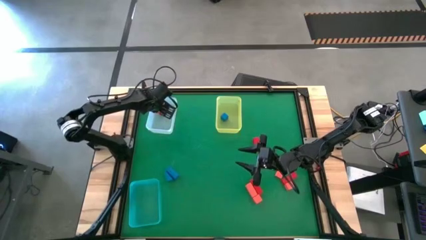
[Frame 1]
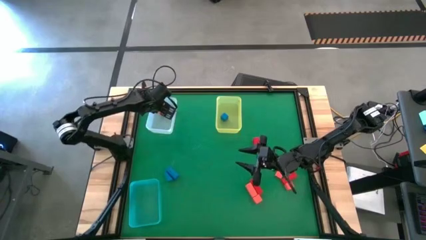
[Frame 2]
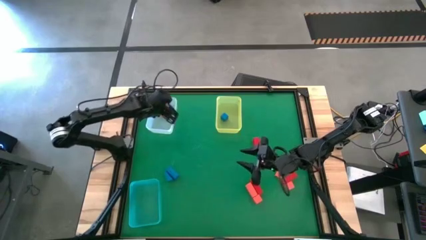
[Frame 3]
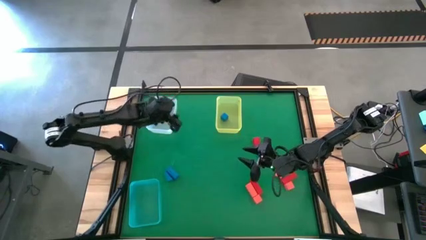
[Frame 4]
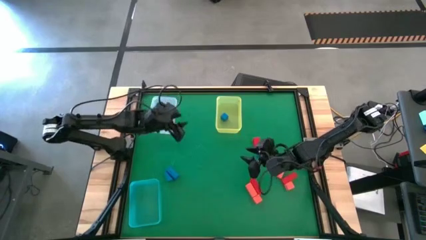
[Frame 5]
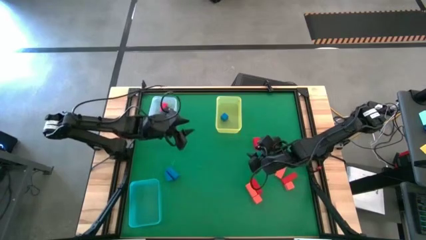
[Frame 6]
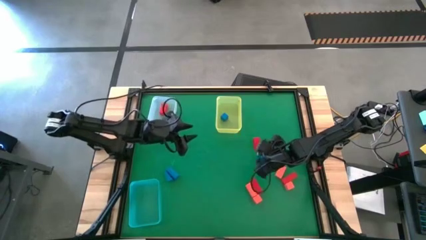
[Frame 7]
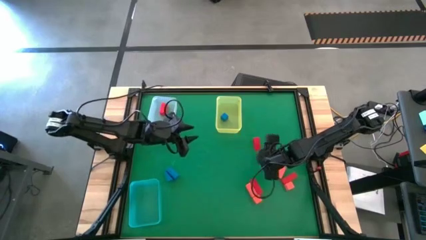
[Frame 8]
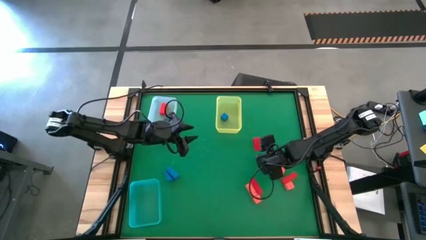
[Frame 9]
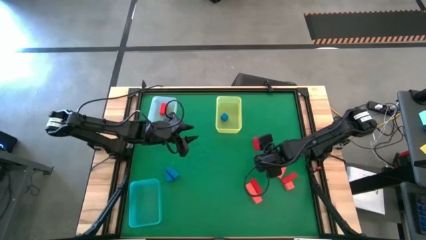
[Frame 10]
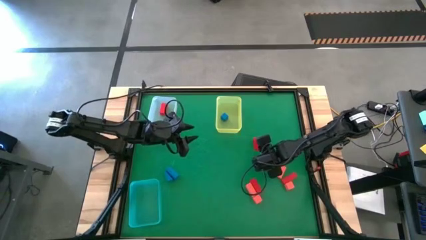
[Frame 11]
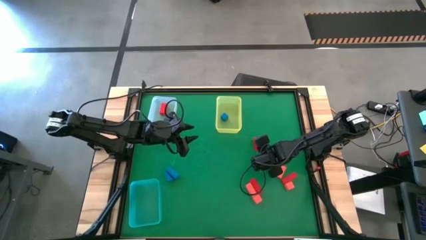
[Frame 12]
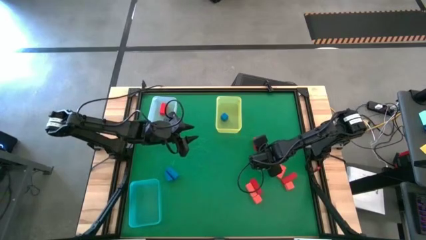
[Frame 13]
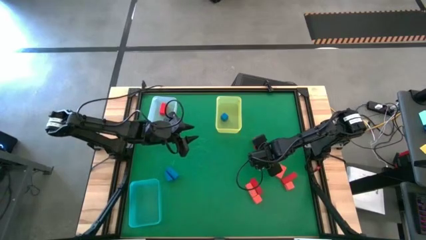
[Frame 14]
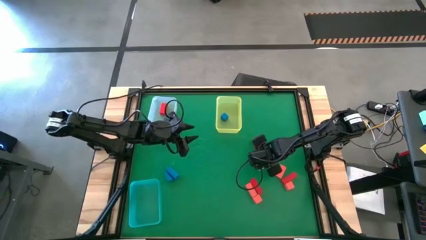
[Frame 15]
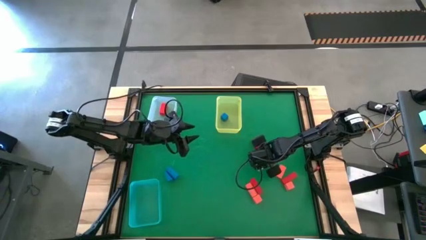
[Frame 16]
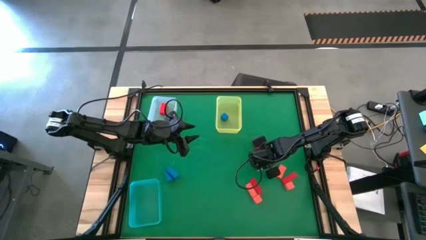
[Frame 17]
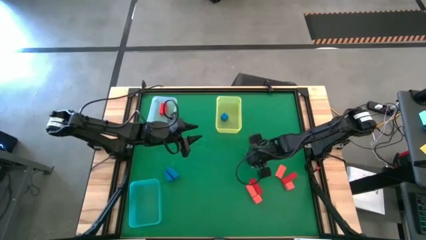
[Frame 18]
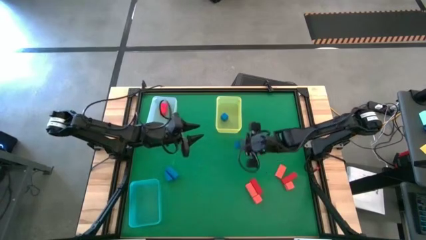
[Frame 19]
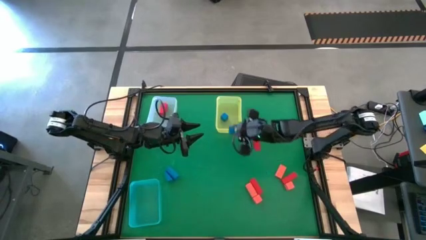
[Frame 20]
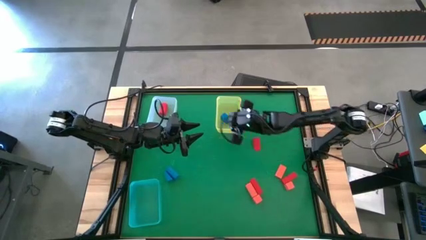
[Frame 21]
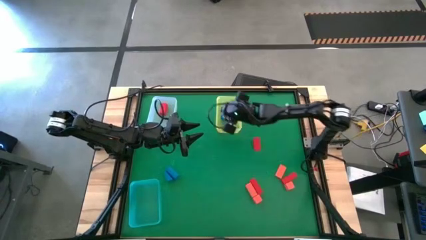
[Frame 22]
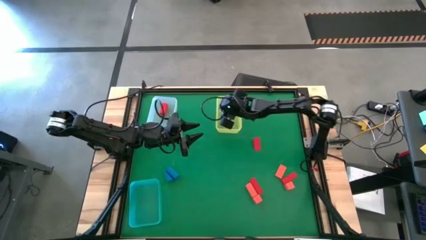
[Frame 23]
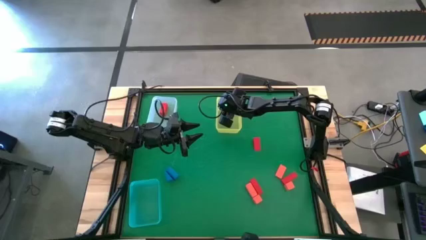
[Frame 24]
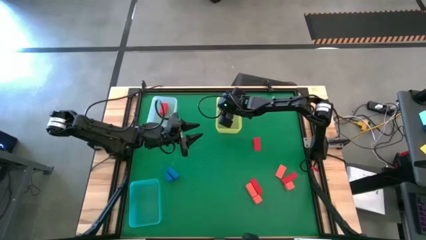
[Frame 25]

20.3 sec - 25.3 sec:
Task: Sort & place blocks by color
Put the blue block into the yellow bin

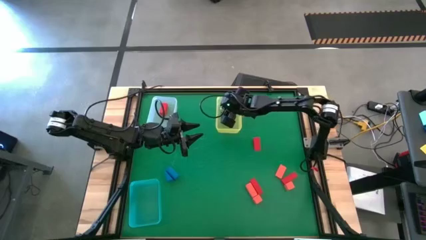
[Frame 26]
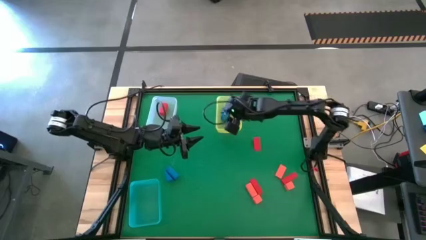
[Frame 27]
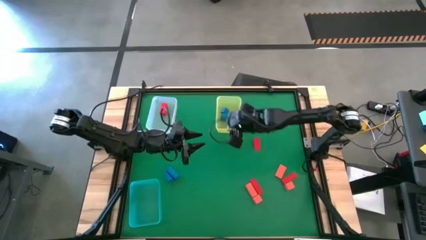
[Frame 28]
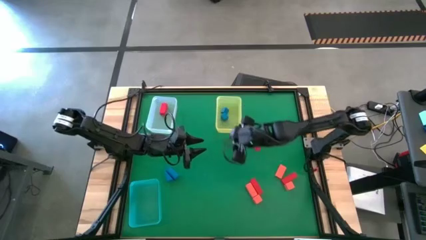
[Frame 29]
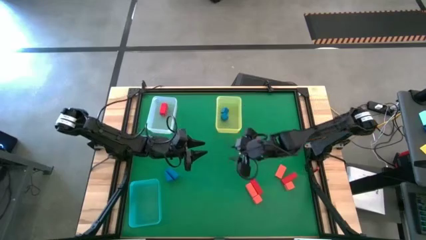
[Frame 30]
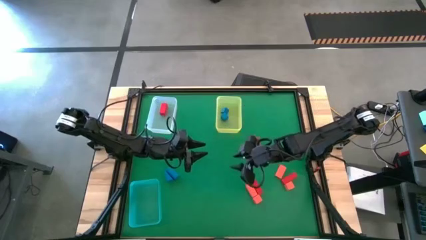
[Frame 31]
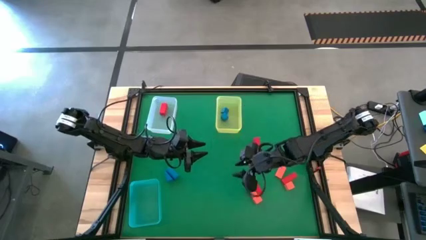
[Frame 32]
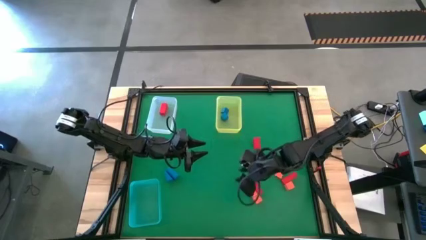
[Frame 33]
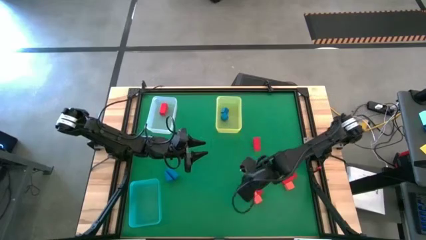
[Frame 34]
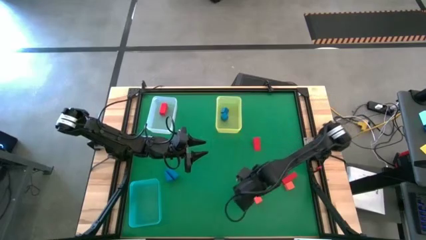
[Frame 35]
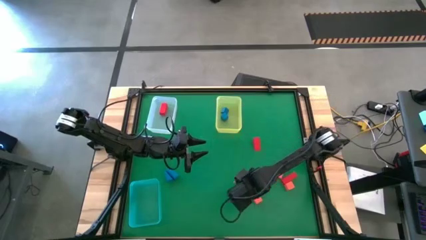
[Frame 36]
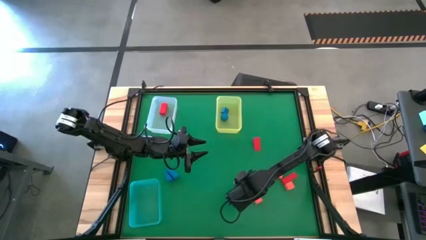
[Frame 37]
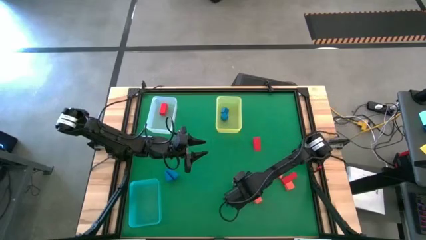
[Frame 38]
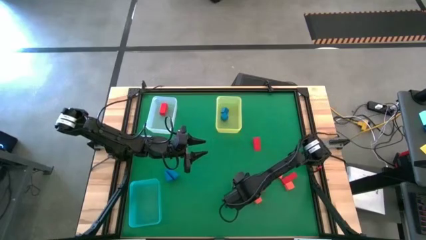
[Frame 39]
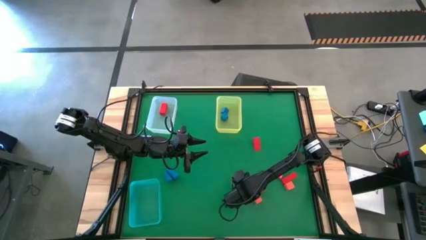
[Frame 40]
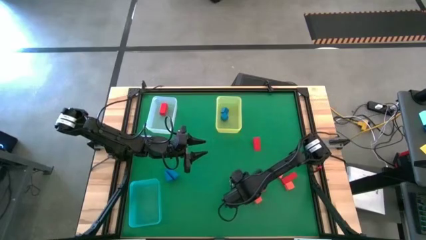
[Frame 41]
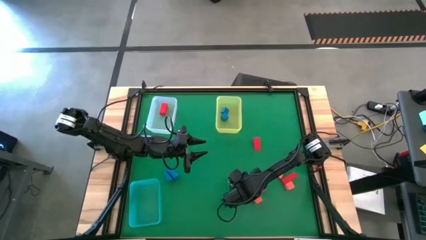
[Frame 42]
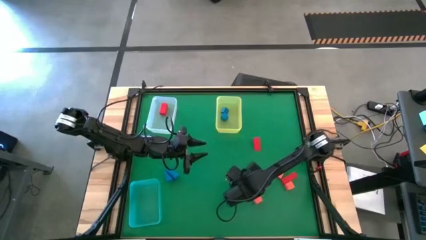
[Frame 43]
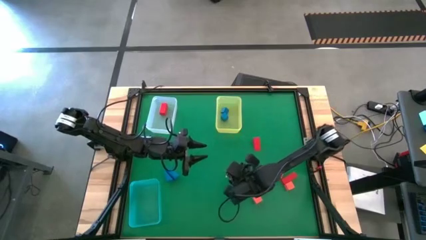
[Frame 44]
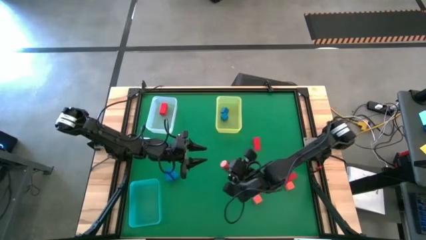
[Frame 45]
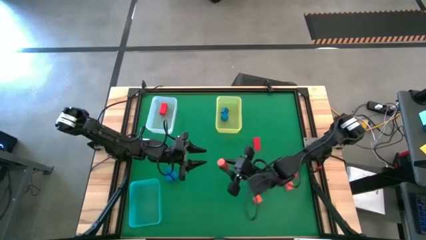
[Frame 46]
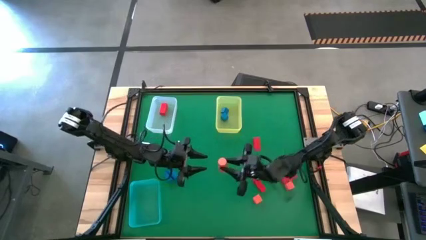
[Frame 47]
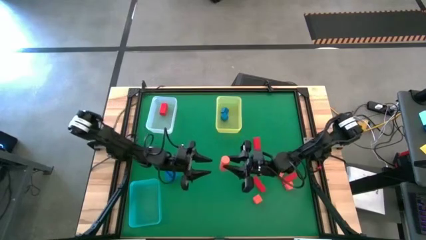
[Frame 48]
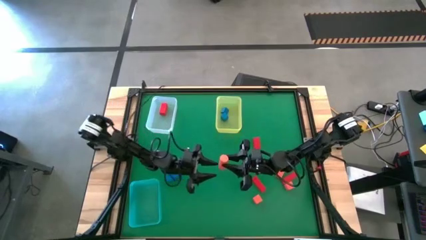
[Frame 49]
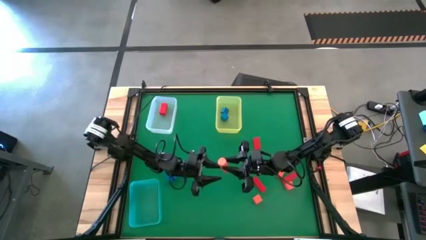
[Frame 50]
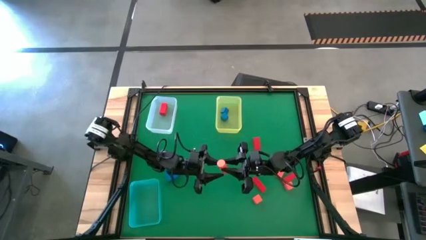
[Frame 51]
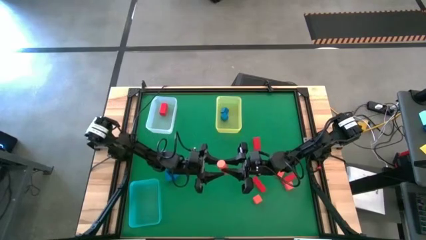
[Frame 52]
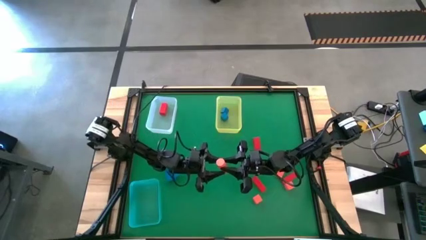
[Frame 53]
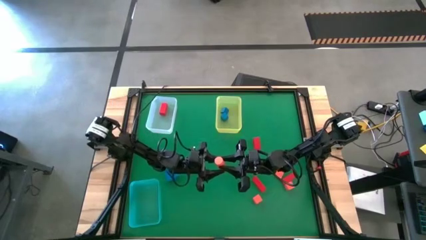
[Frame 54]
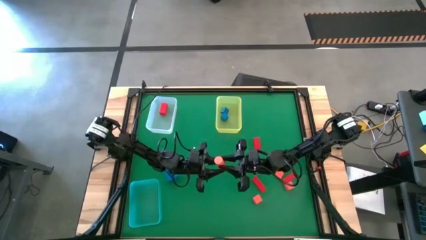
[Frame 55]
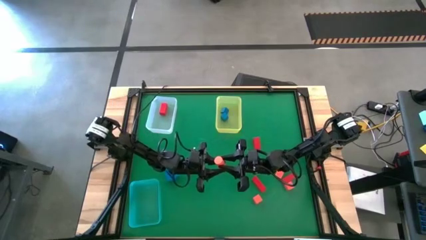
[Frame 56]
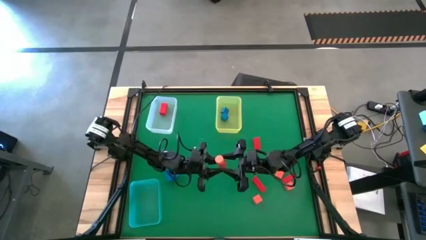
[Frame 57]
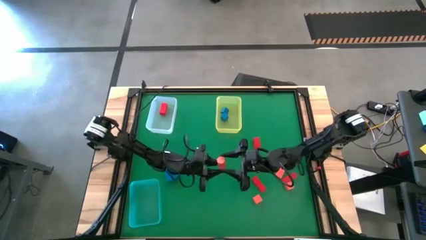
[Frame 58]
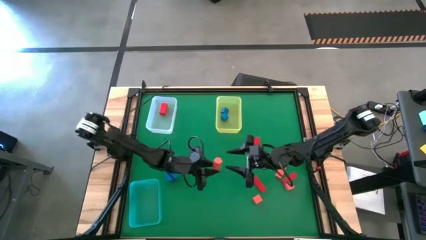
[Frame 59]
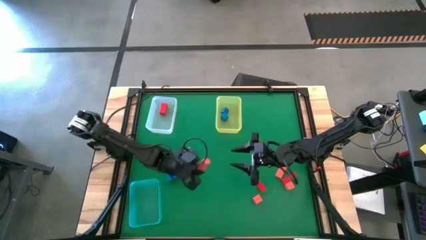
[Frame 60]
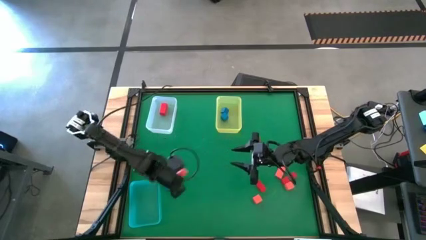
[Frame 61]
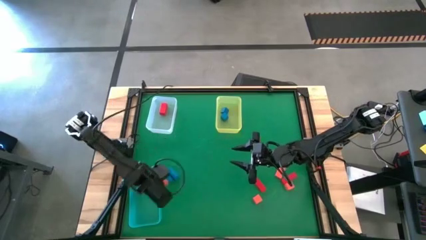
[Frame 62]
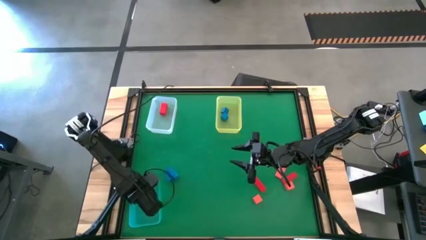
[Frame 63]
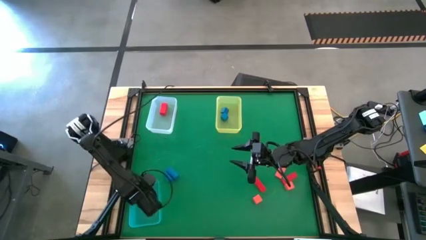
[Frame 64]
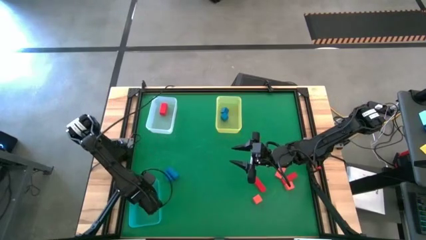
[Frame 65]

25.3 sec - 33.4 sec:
Put the orange block into the blue bin

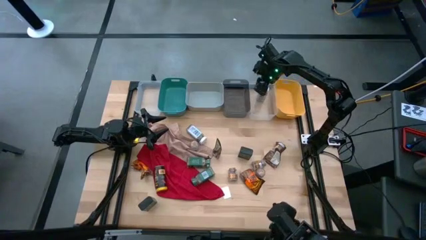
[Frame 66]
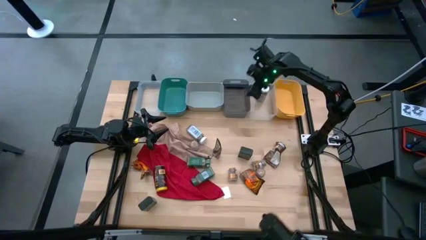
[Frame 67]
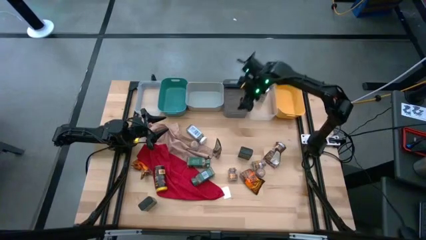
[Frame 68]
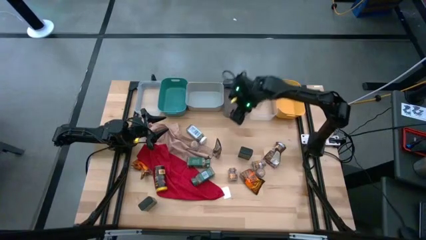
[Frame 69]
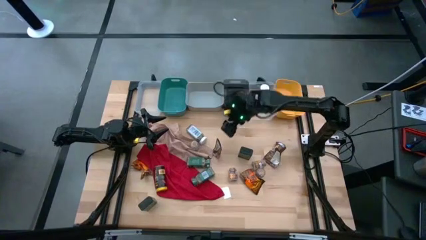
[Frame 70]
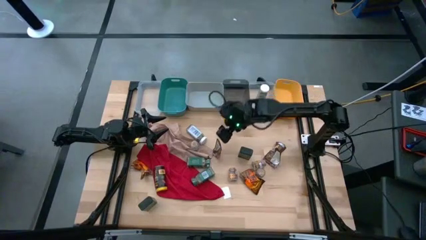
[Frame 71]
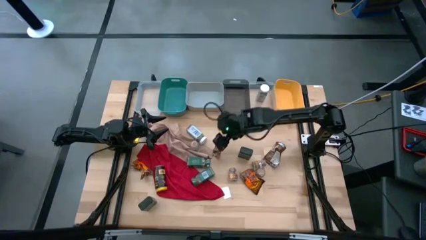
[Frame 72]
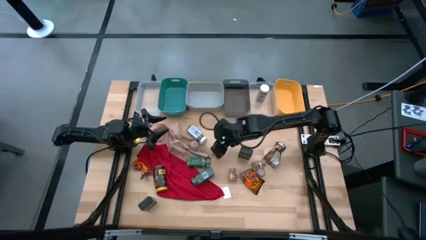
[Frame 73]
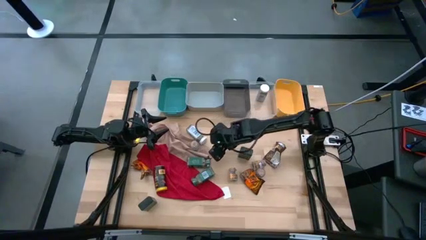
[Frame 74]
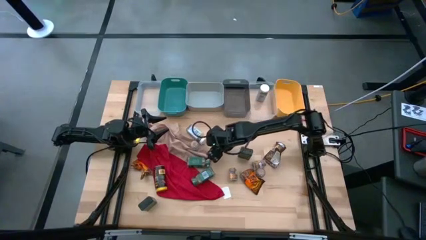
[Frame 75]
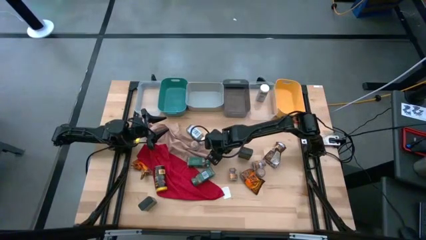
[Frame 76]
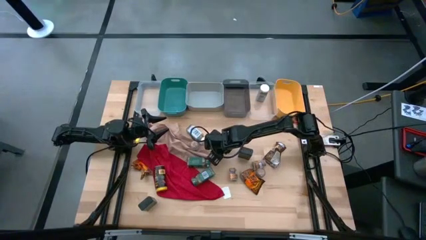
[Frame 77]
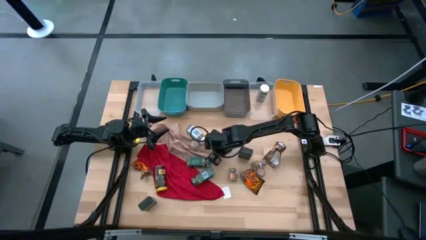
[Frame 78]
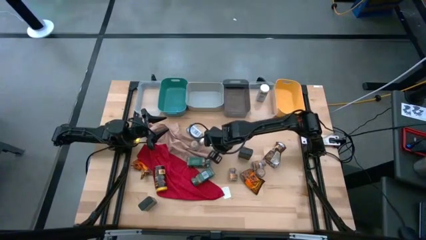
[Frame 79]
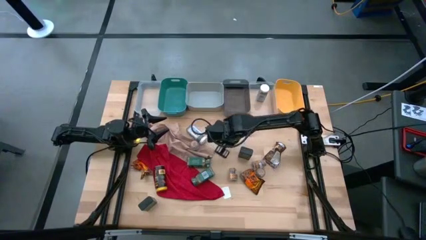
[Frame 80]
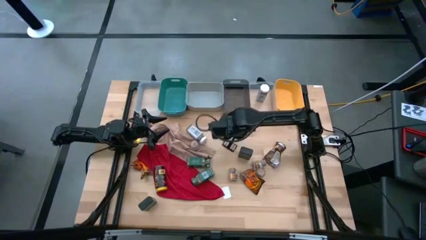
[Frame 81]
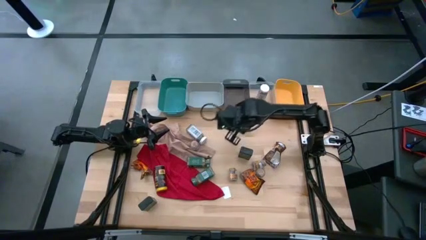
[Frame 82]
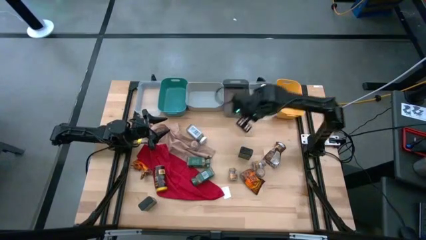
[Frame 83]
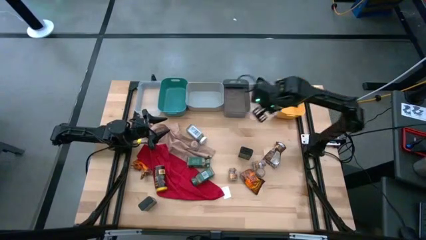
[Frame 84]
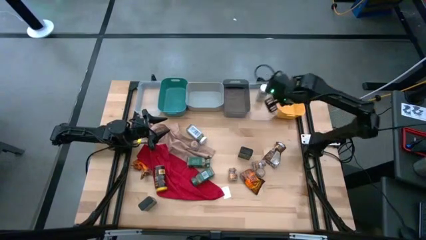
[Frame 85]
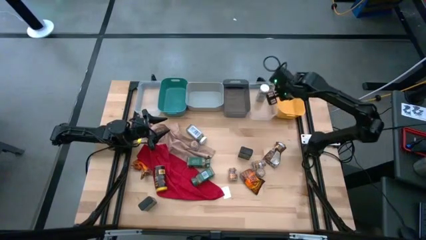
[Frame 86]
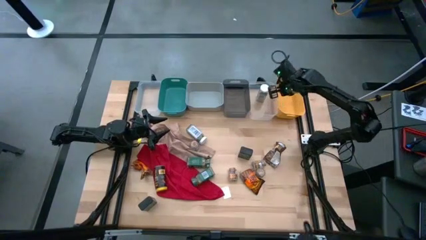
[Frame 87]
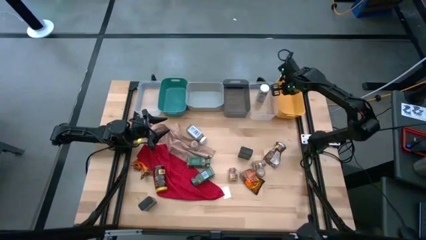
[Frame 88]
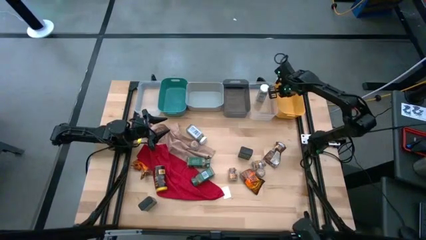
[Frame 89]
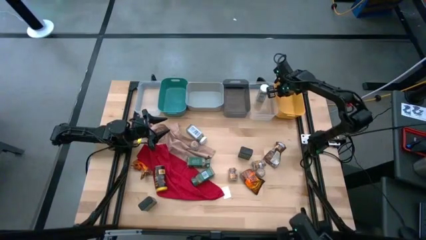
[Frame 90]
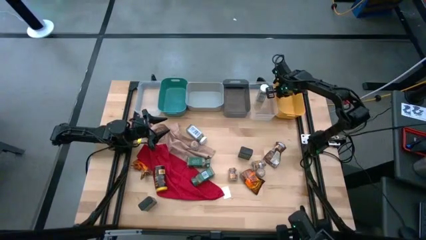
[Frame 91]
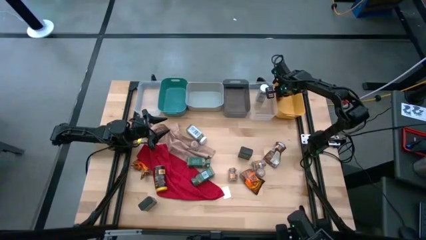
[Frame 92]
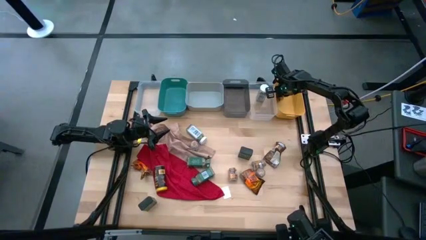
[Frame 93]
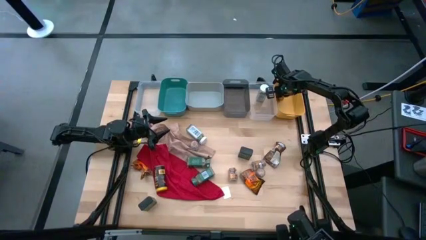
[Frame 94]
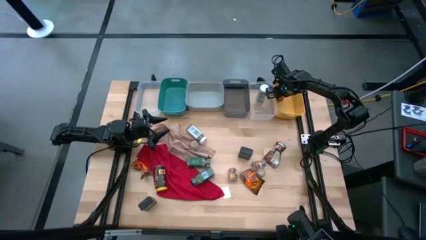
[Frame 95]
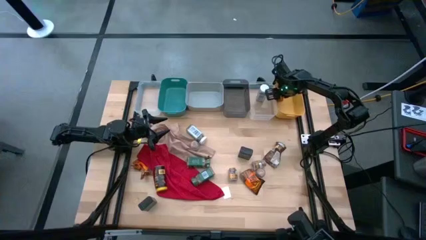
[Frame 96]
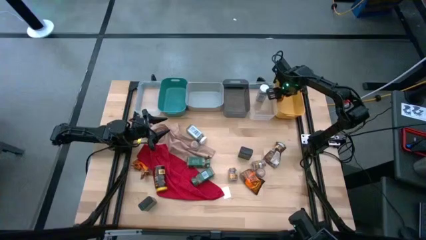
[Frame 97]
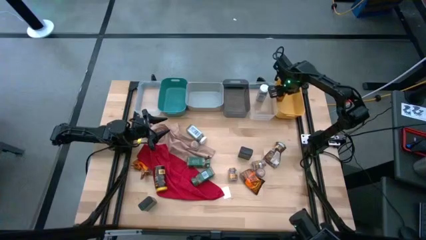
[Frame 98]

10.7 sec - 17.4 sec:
Task: Sort spices by type
Put the orange seasoning bag into the yellow bin
